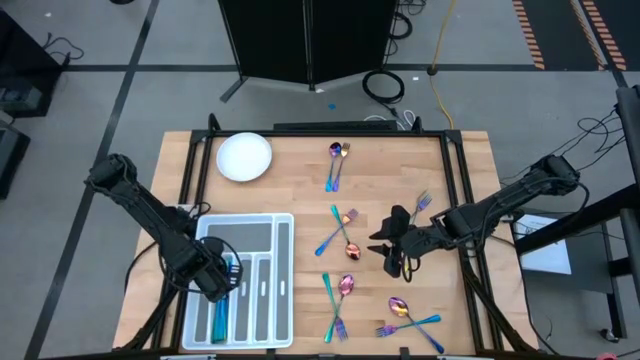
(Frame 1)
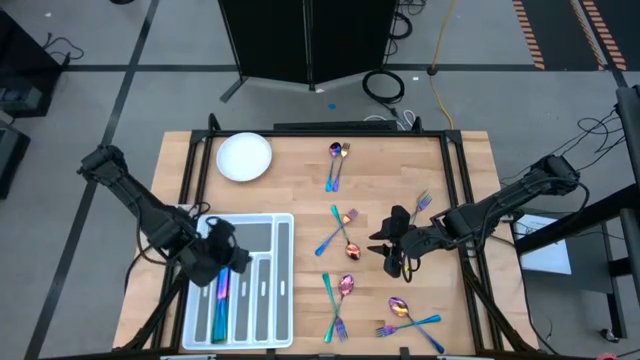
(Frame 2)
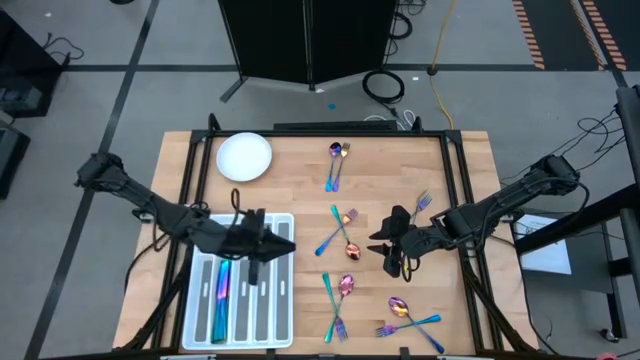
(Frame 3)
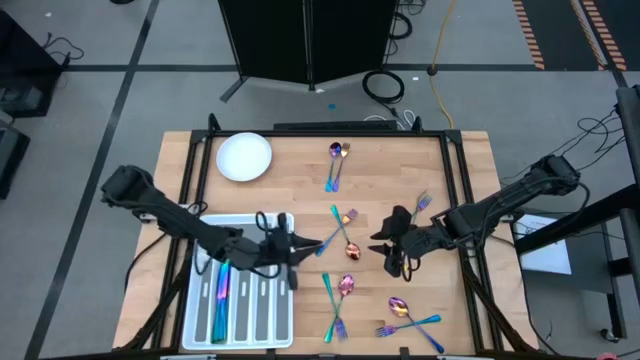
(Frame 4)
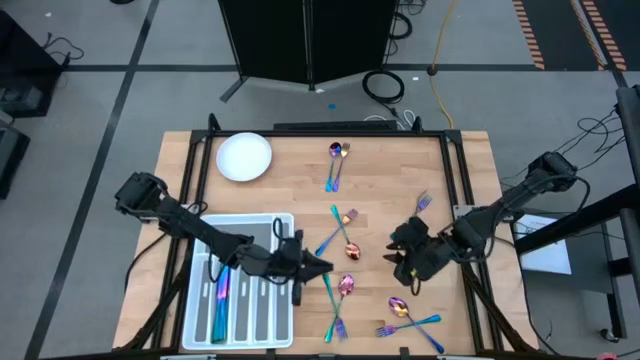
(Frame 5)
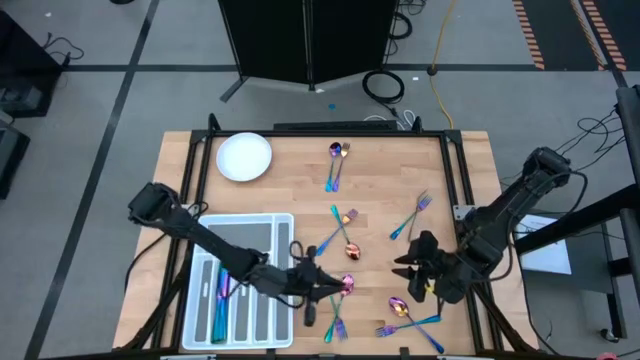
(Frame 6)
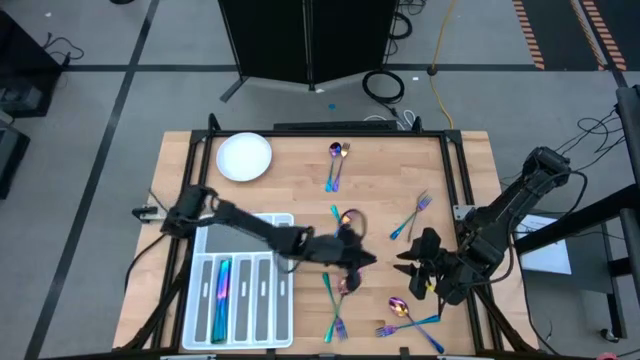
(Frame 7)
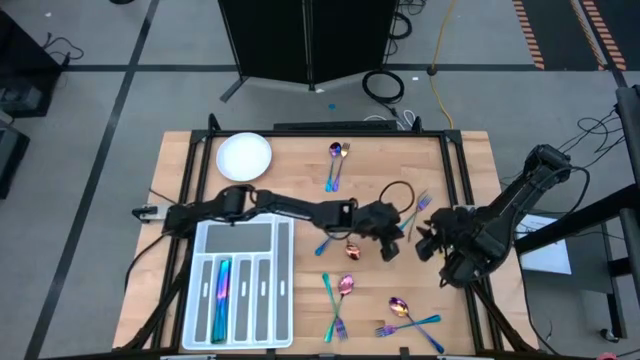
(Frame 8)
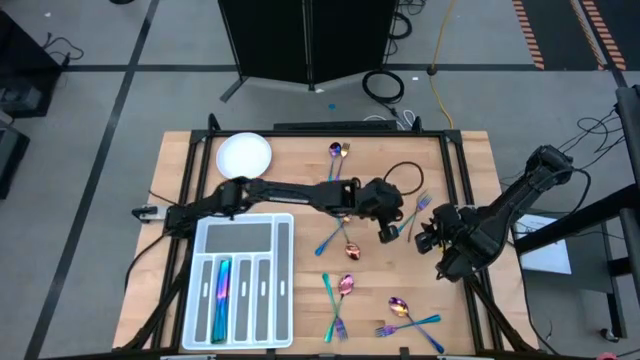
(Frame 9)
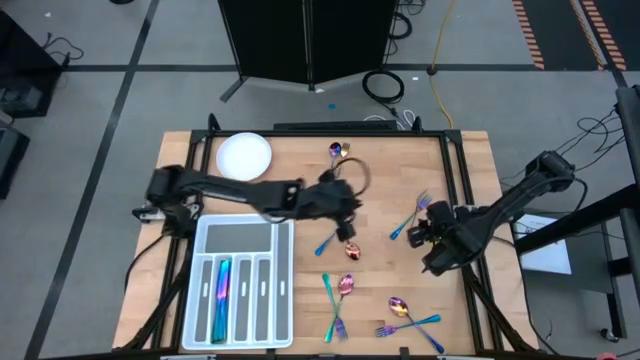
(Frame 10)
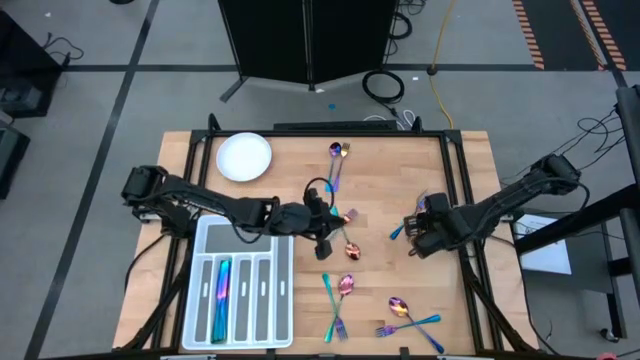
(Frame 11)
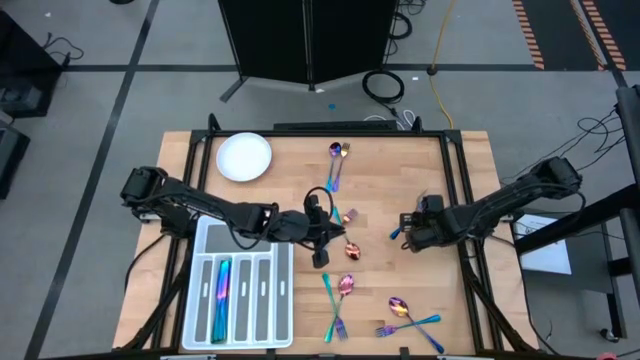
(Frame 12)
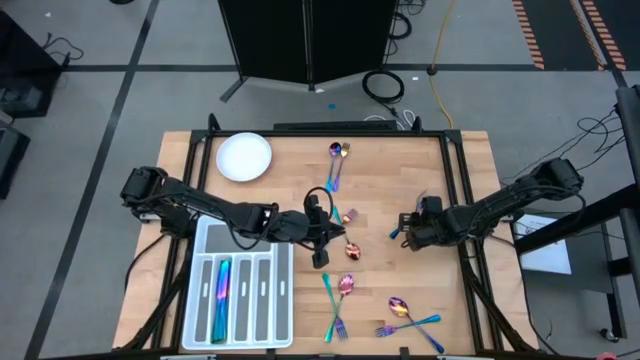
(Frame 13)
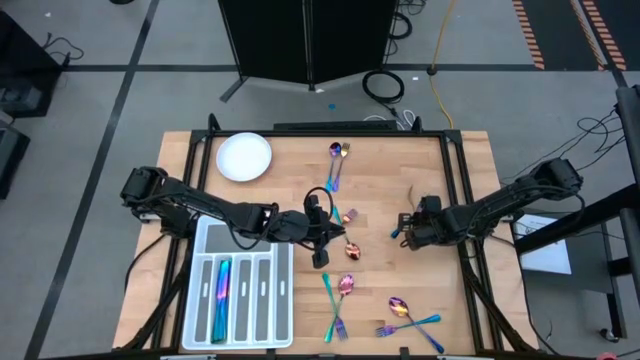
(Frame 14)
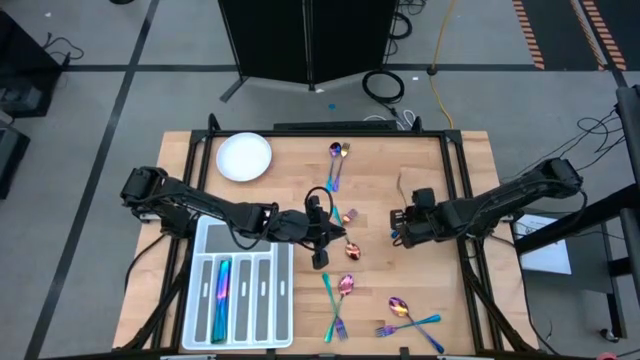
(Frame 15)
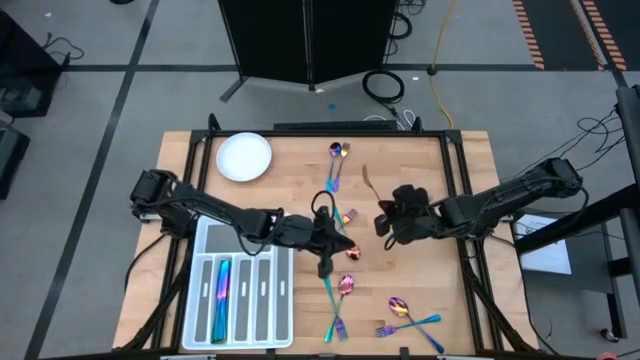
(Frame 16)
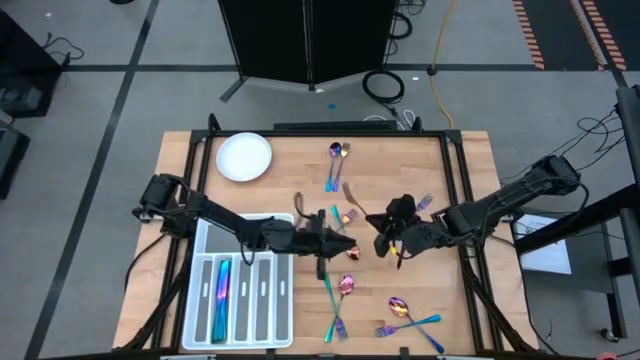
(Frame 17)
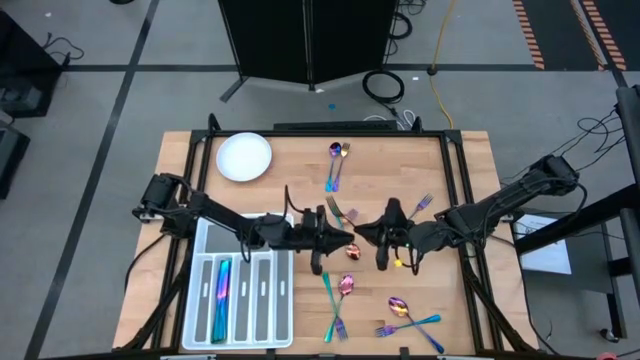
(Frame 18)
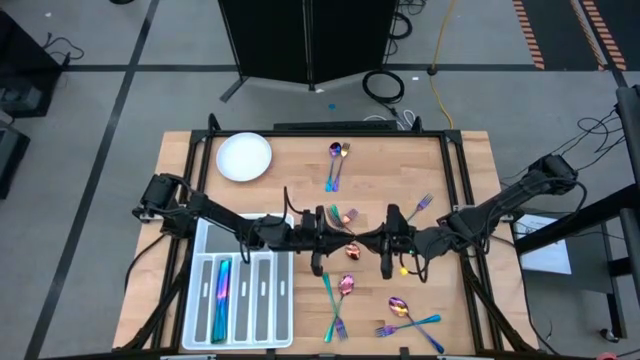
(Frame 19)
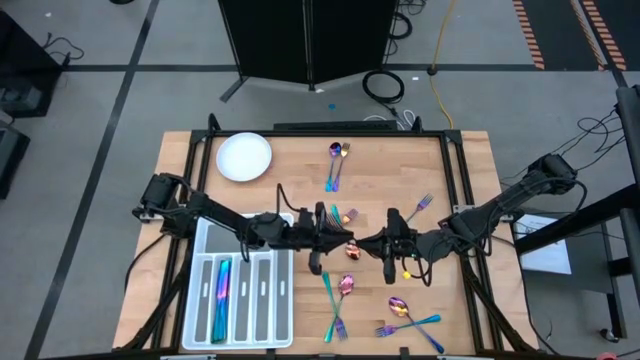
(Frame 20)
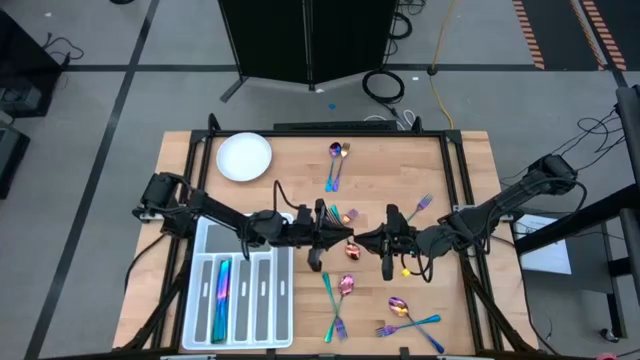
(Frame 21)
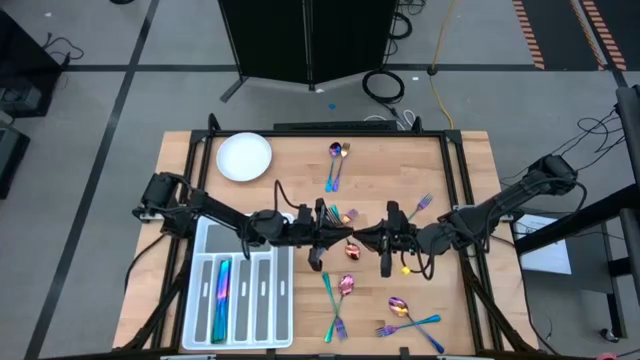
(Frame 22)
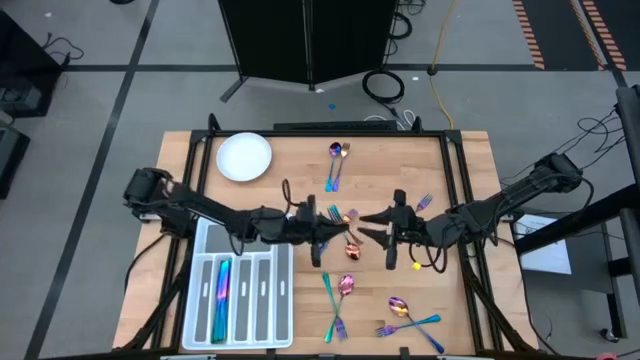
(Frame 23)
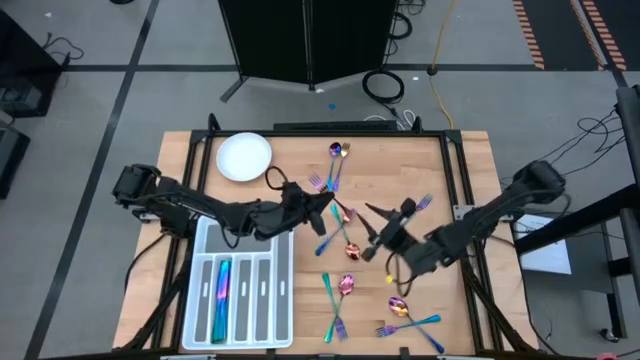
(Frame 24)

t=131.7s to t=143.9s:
Task: Sort silverware
Put the iridescent blue fork in the middle right slot of the silverware tray

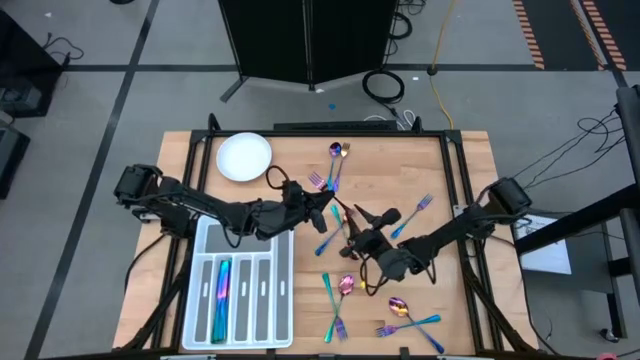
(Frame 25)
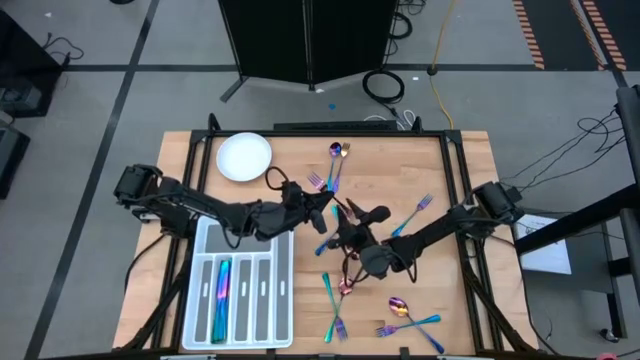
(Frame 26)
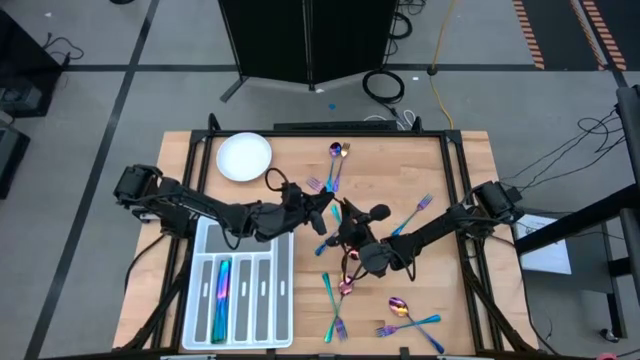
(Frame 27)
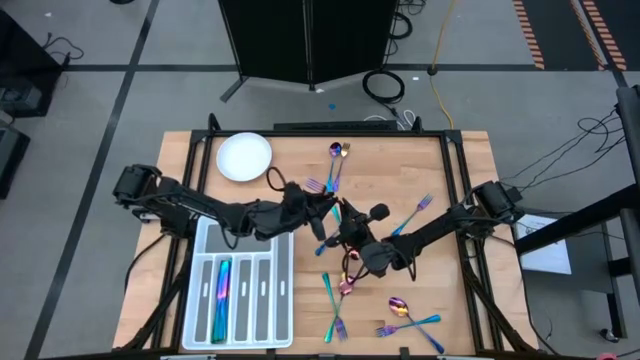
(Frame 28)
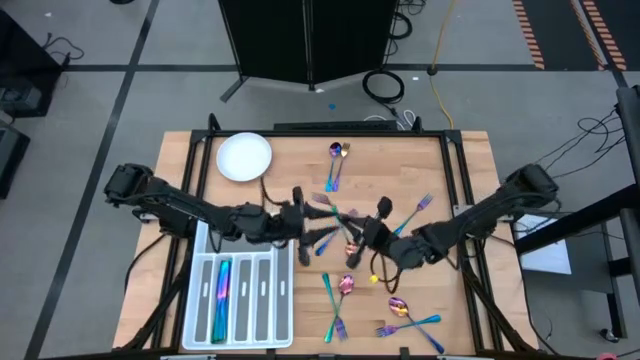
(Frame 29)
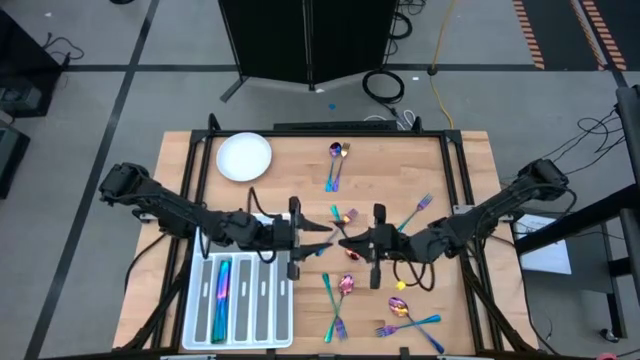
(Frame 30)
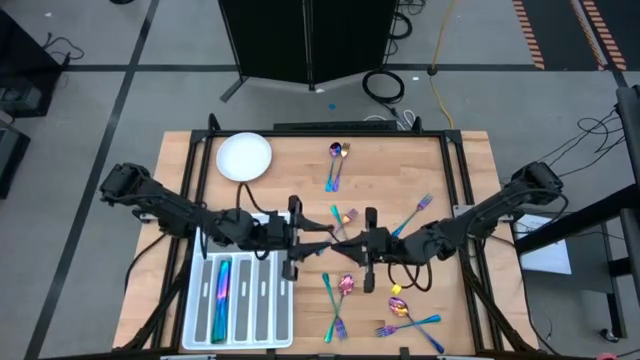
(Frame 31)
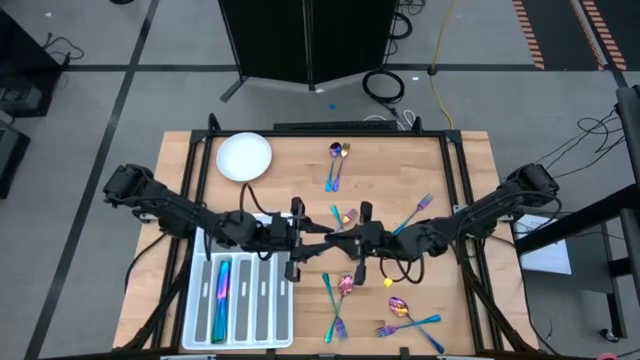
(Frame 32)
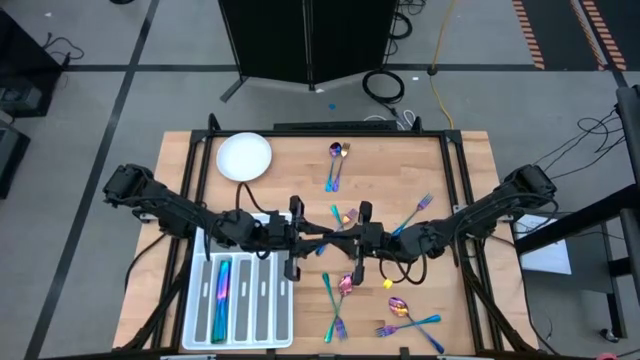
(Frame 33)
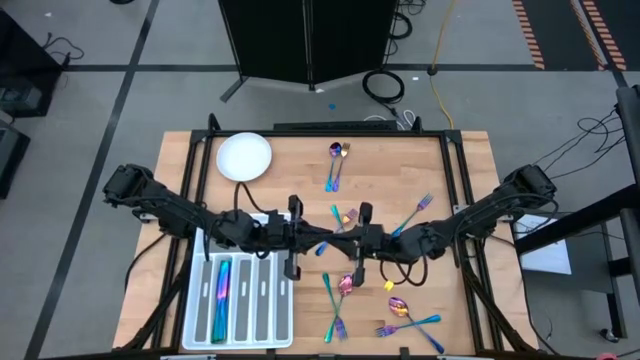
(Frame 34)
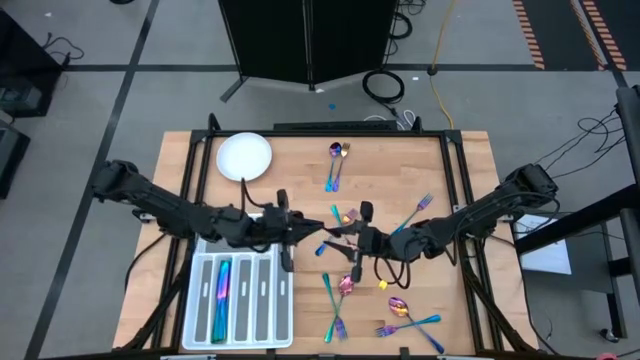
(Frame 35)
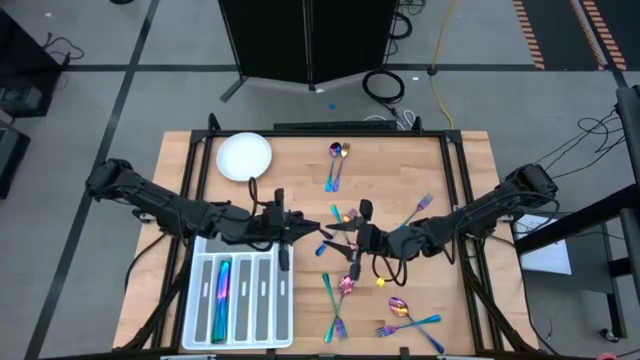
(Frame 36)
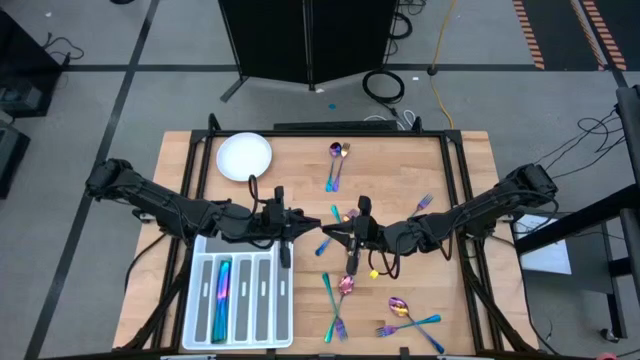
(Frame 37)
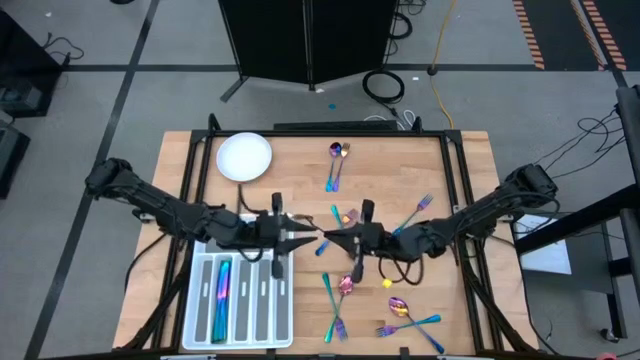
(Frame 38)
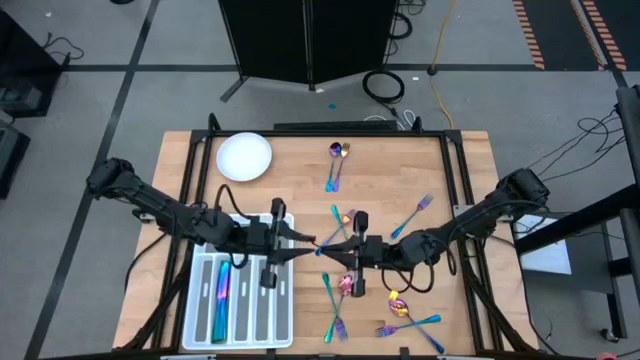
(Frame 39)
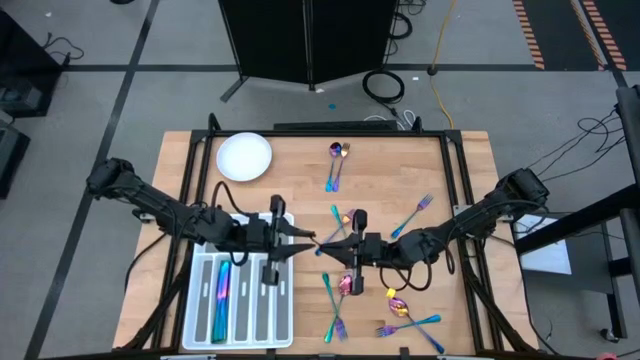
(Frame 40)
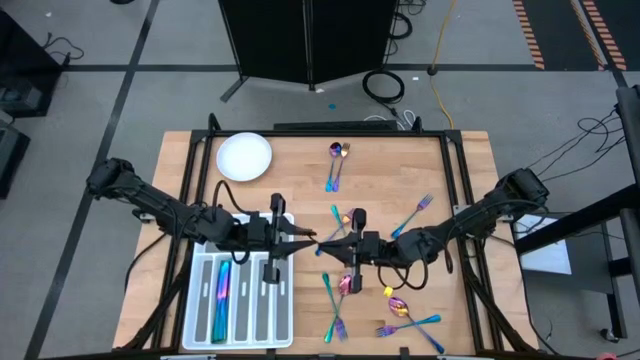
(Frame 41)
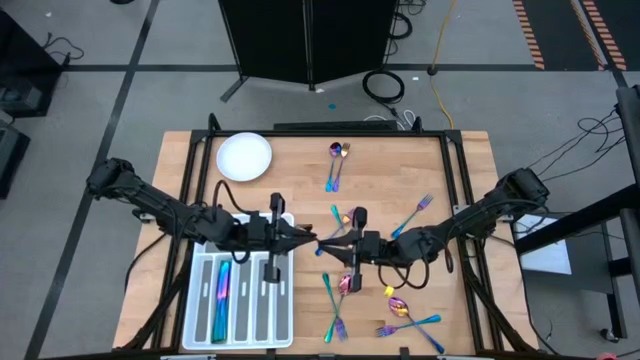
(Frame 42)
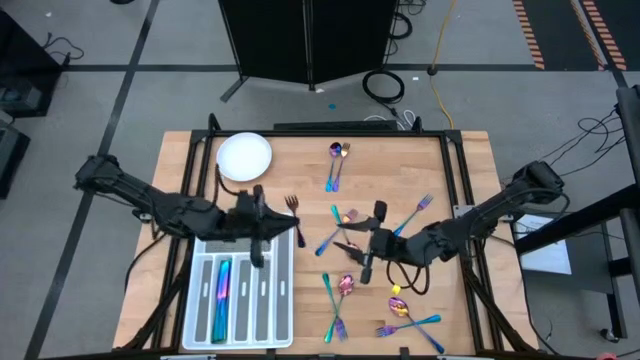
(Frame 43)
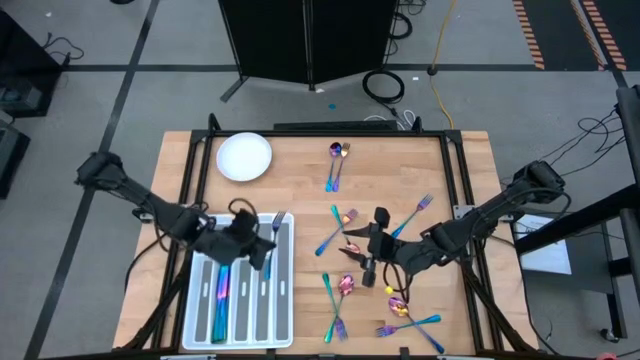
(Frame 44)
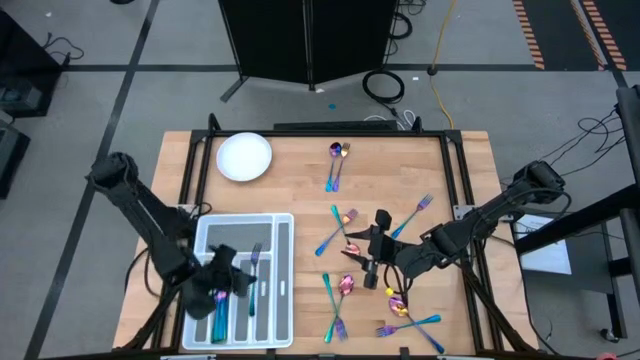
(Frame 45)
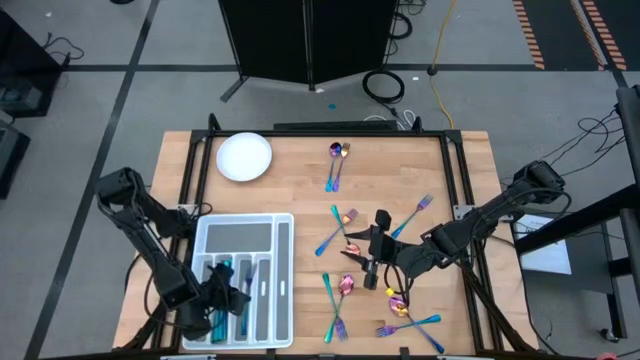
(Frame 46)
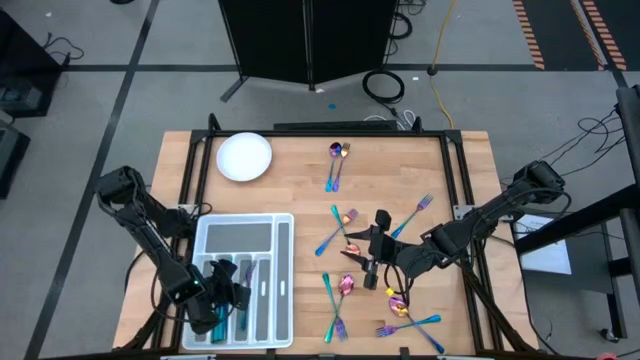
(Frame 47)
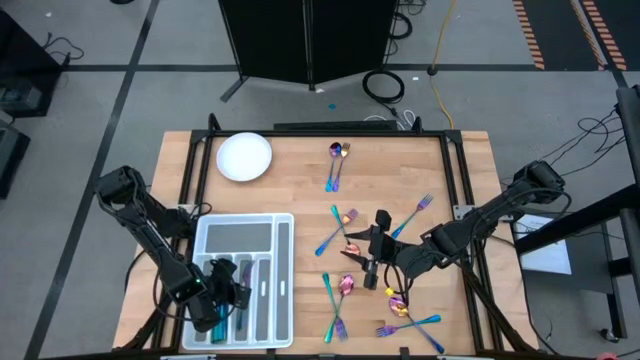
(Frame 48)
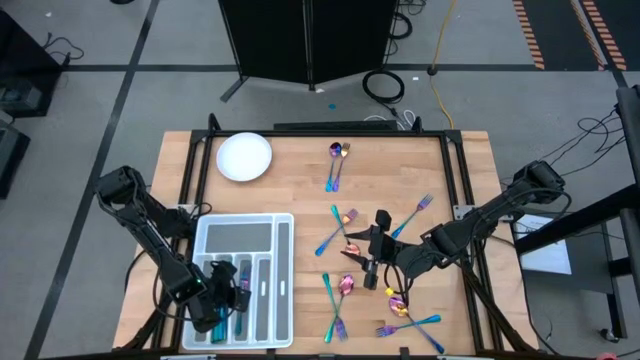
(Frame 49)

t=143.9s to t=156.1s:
Put the iridescent blue fork in the middle right slot of the silverware tray
